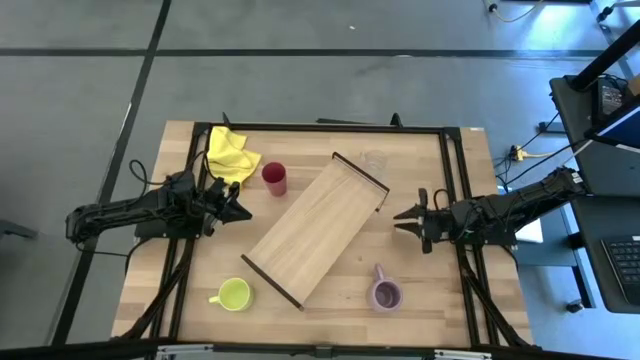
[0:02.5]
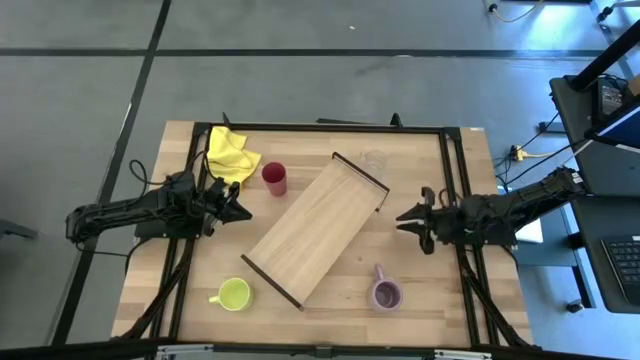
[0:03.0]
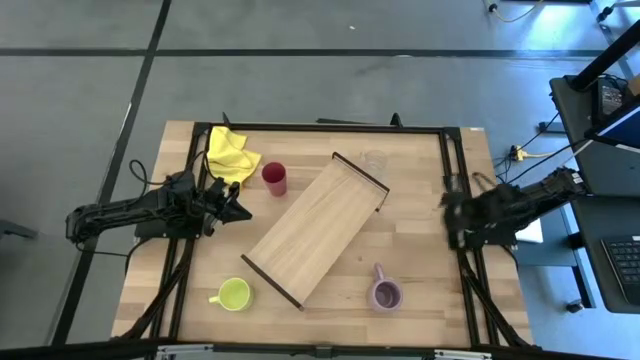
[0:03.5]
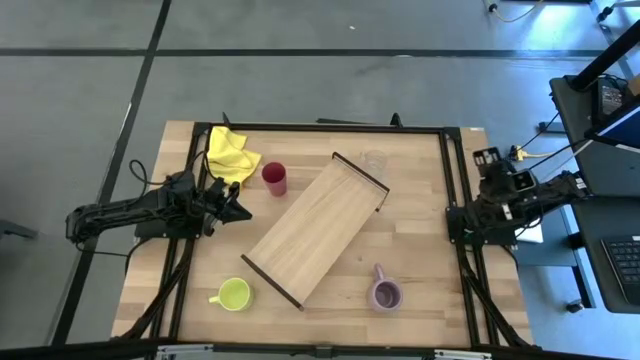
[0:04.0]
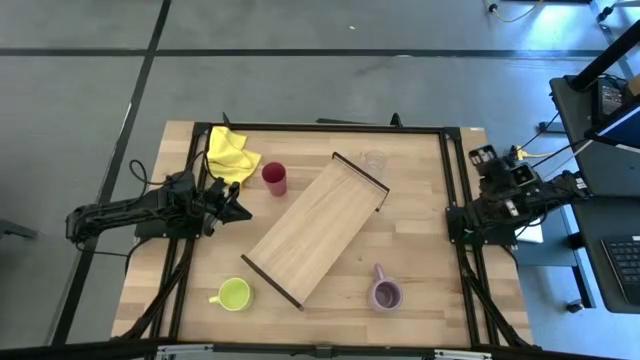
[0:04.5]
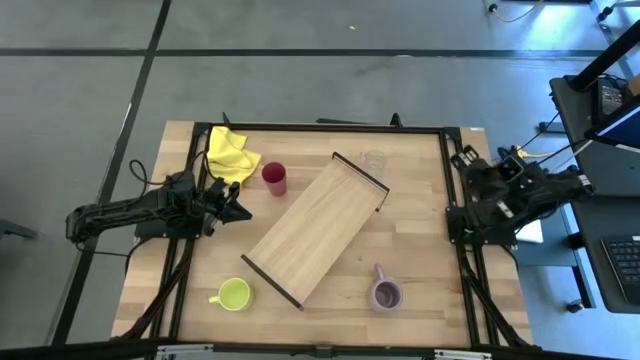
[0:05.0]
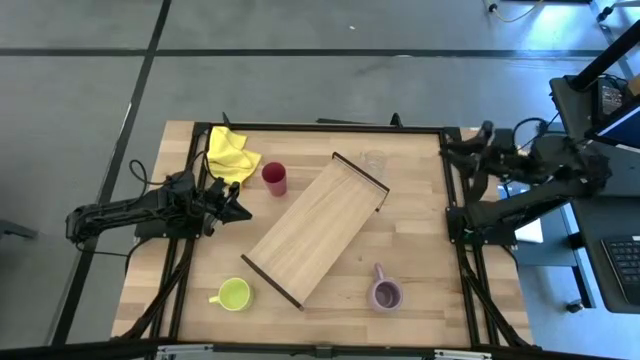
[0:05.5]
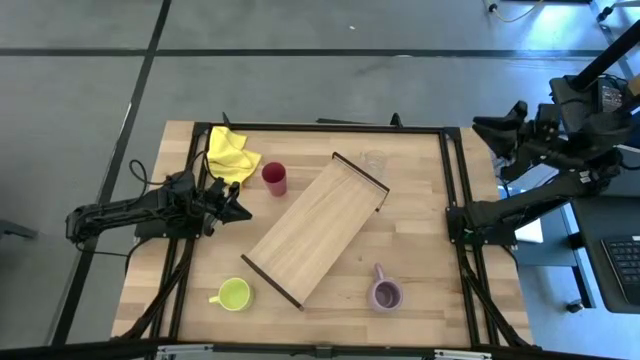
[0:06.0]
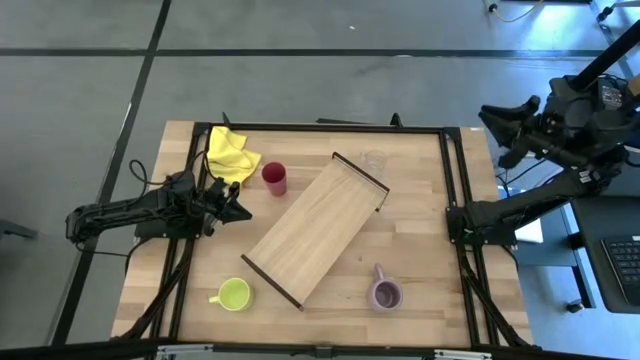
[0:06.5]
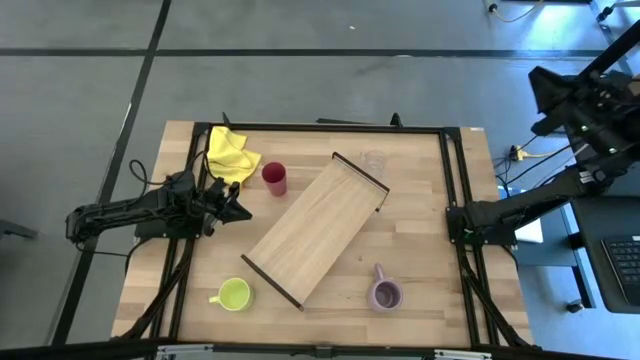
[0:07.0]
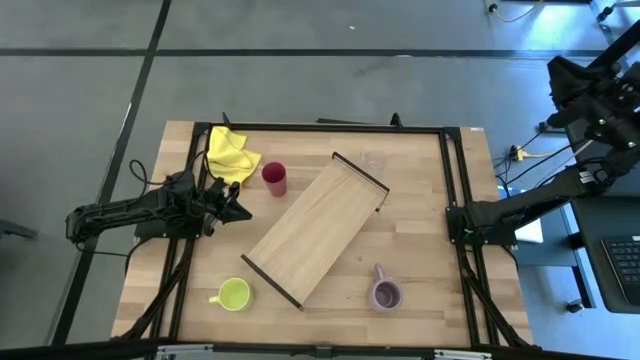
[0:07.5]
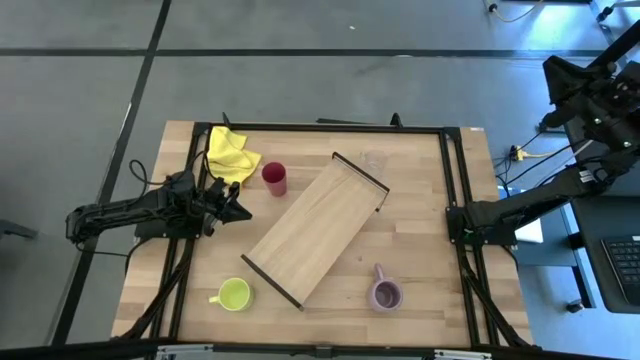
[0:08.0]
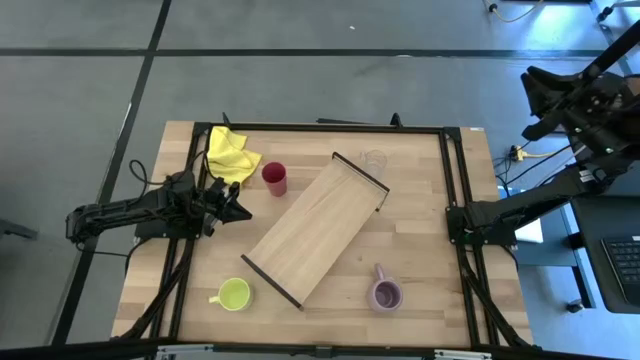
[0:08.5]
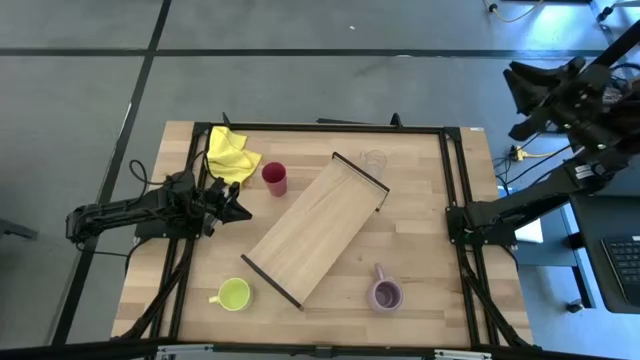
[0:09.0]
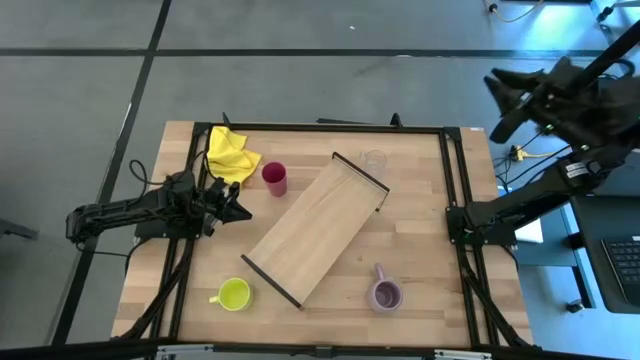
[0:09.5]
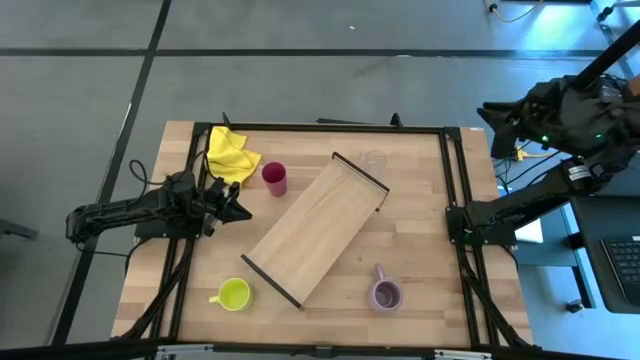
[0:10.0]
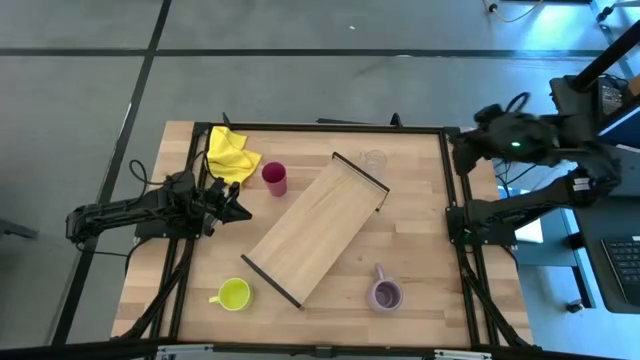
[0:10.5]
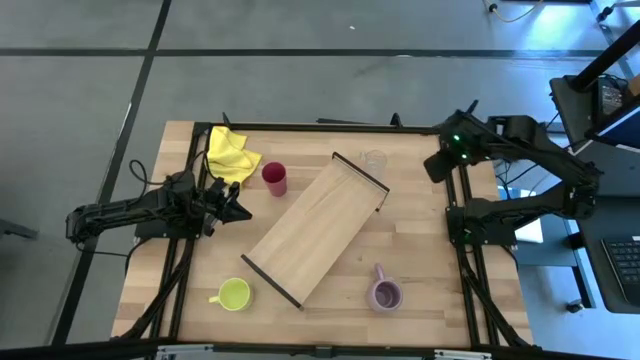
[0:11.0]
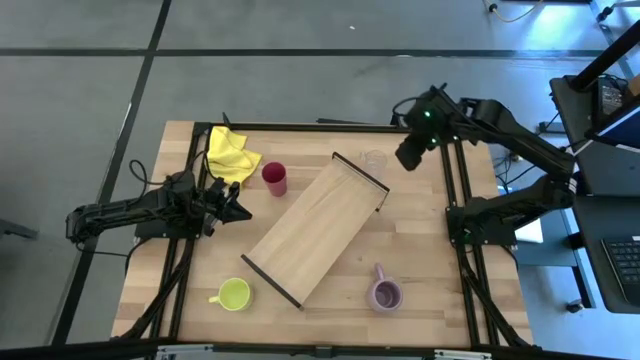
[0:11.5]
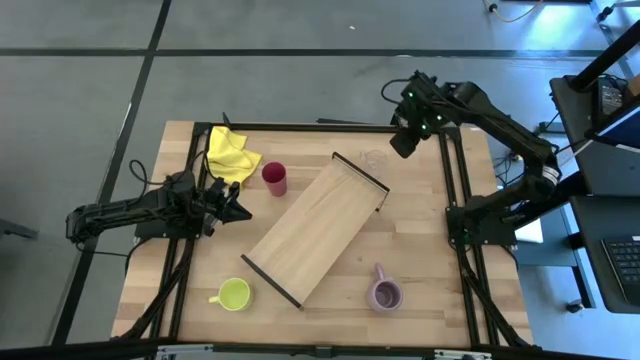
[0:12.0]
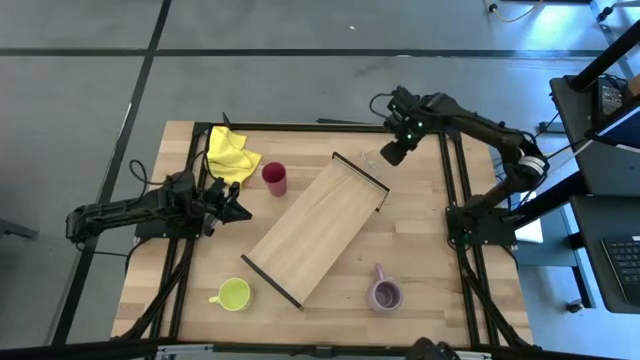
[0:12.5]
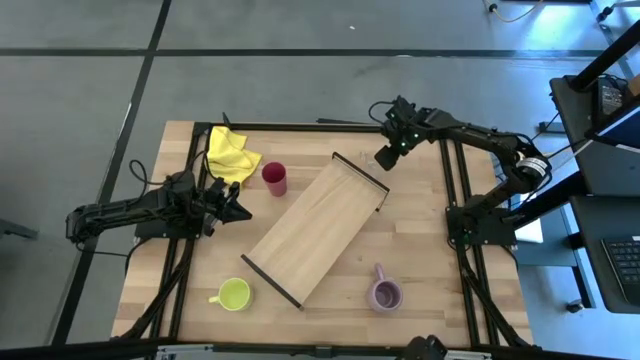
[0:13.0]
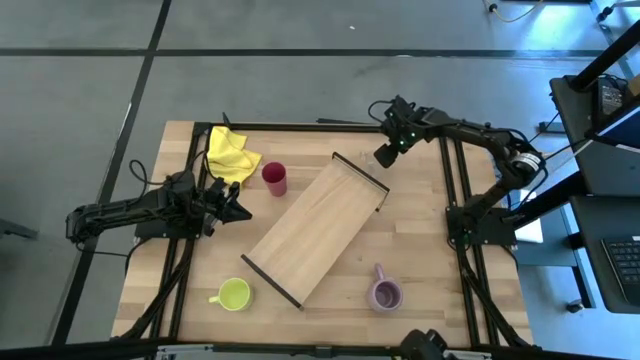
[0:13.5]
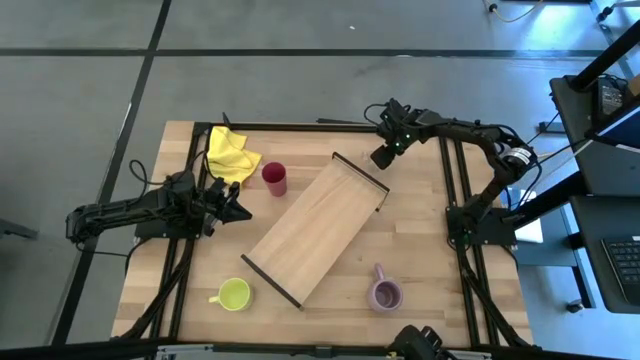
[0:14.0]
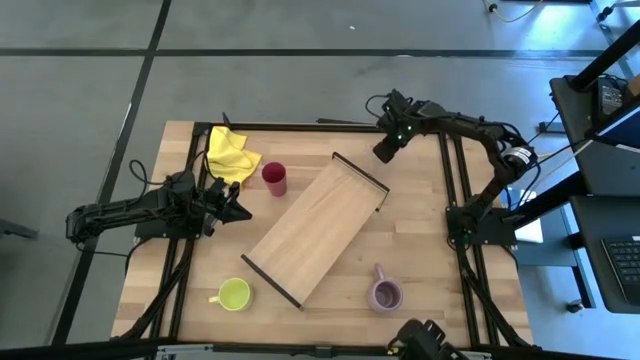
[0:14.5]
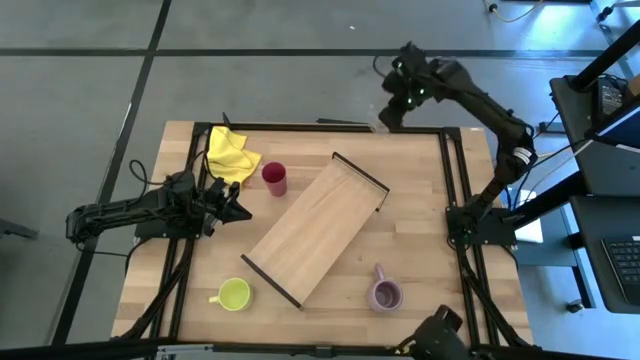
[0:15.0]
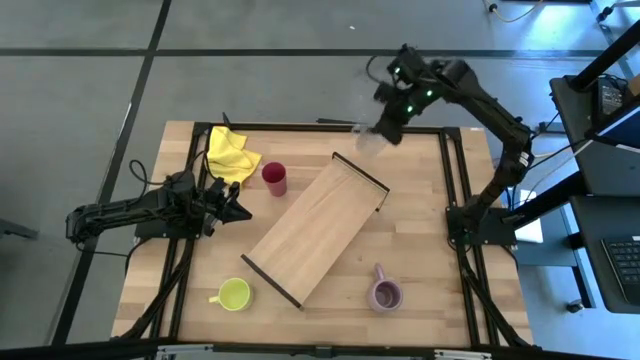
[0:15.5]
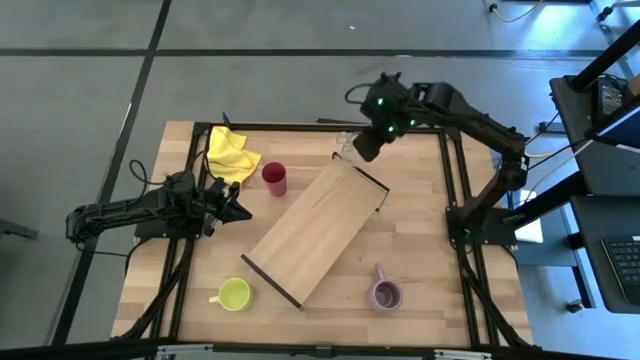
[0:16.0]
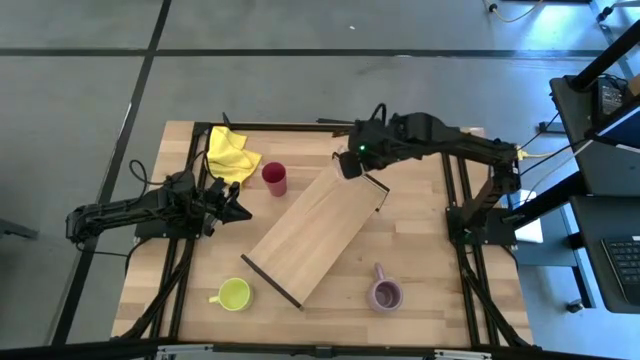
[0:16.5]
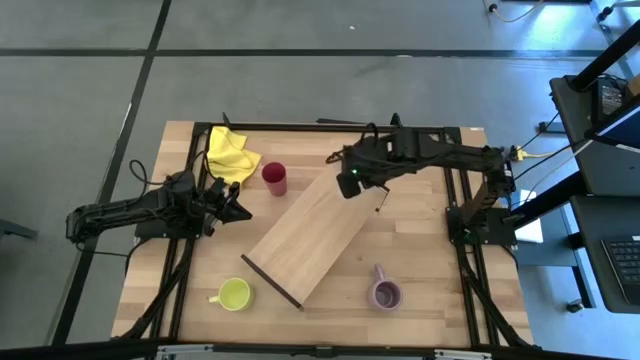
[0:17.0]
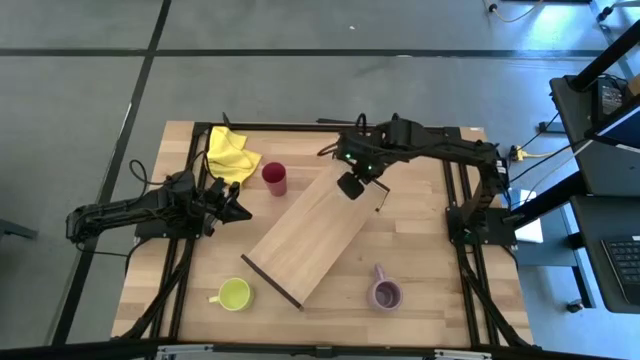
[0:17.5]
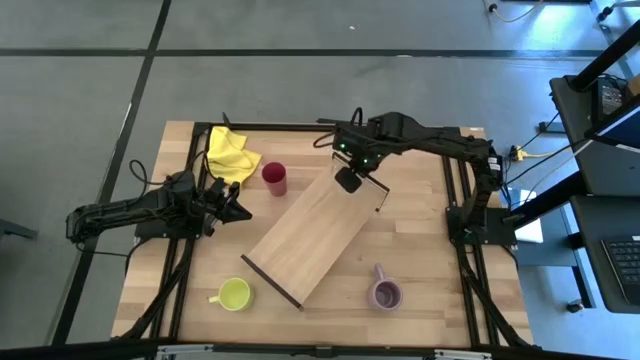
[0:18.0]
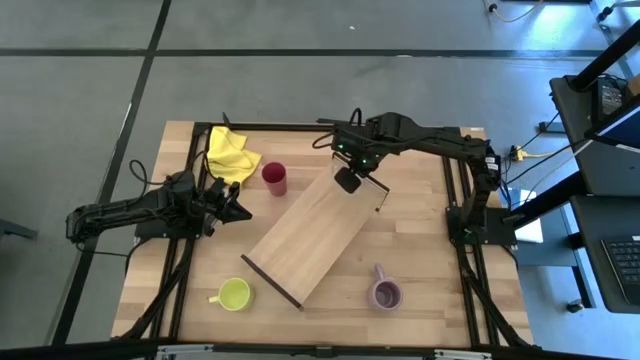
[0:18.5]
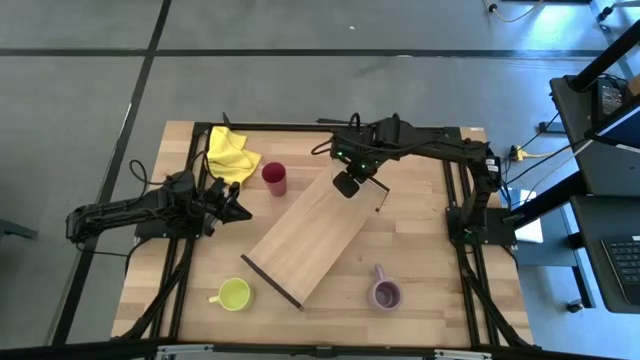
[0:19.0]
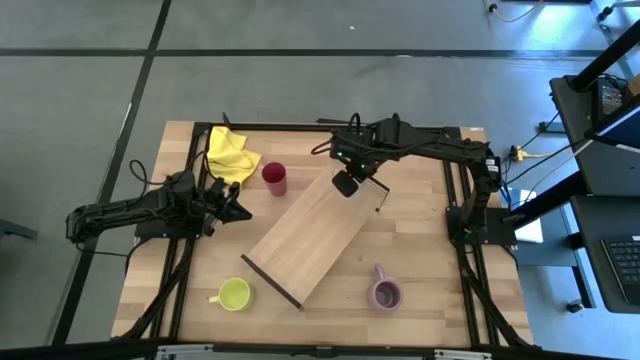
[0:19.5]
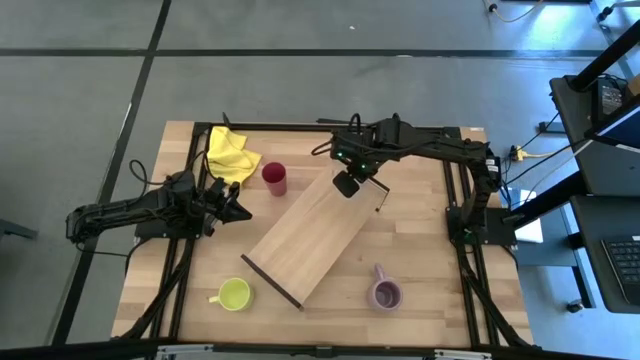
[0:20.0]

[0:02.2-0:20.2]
Task: Stack small to large cups/mugs on shelf
Put the transparent mug on the shelf
